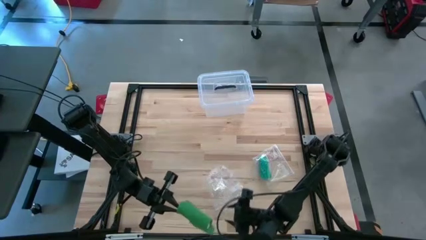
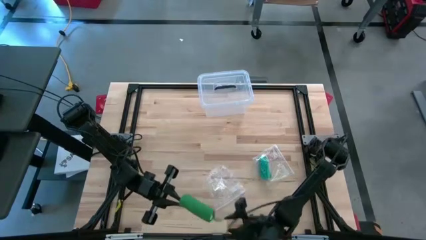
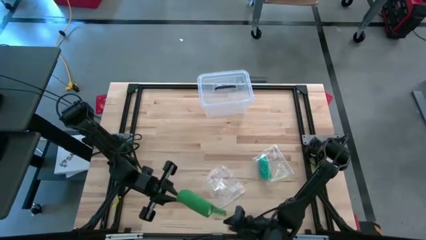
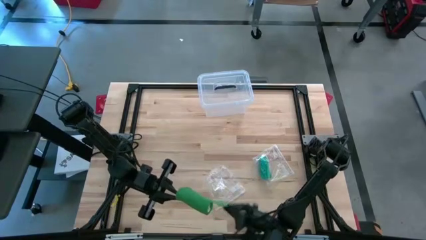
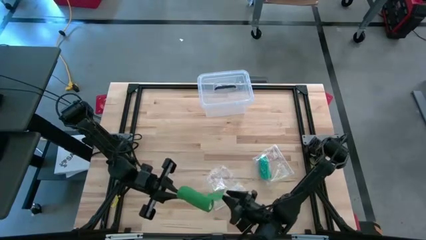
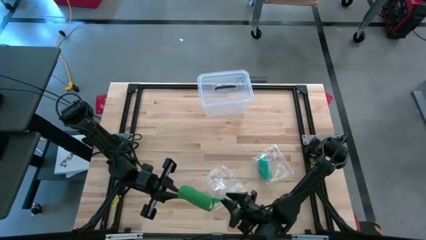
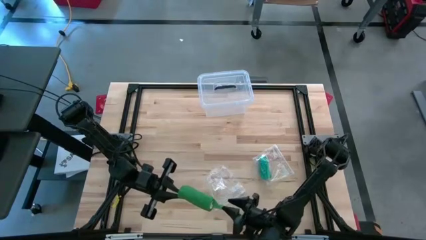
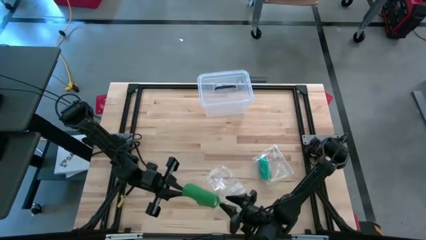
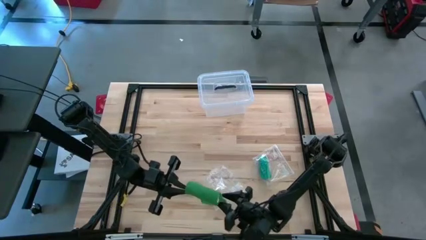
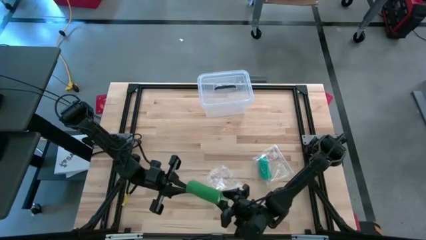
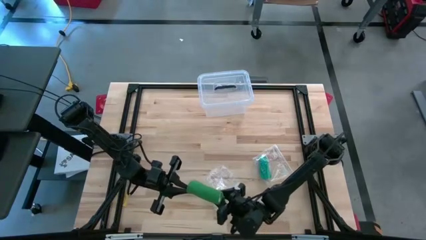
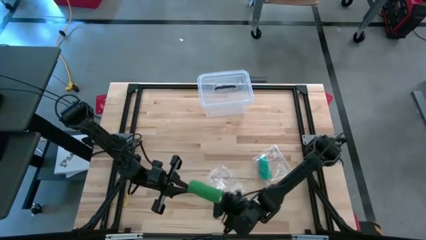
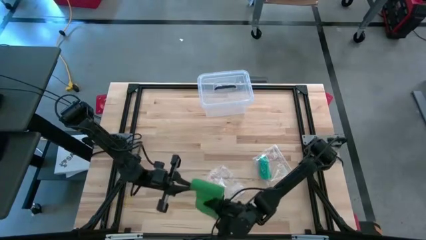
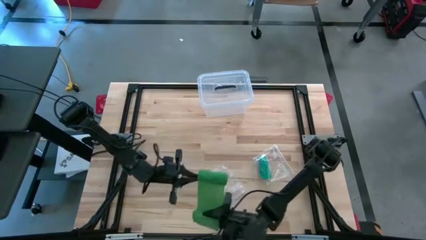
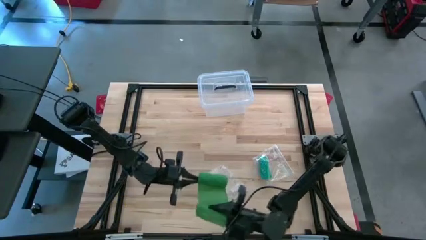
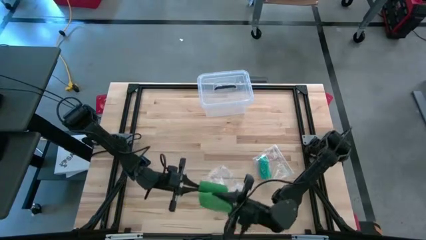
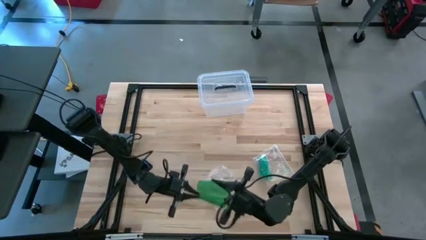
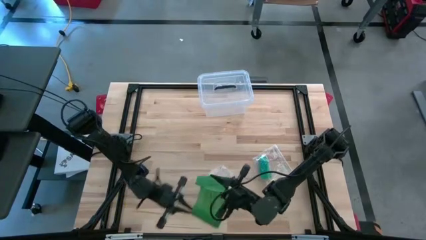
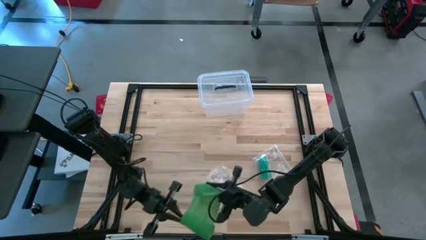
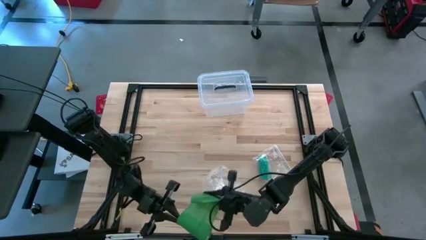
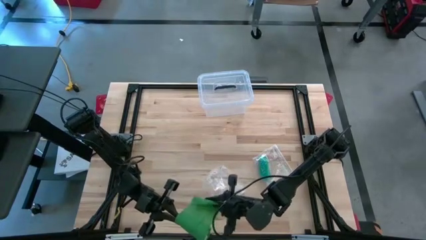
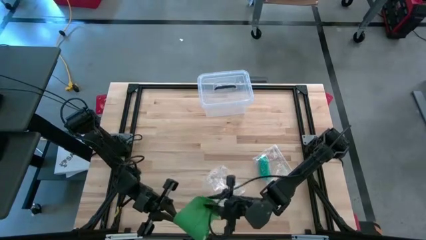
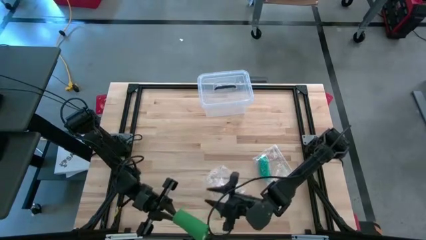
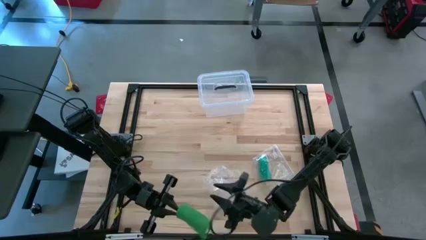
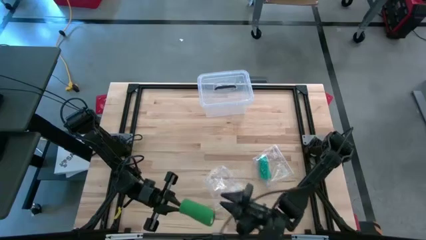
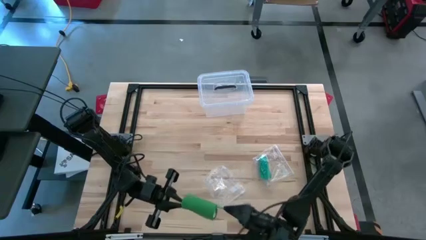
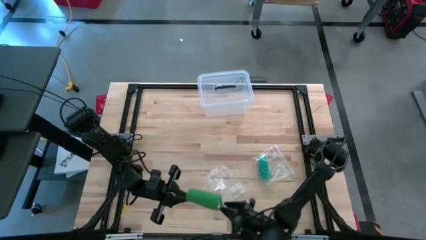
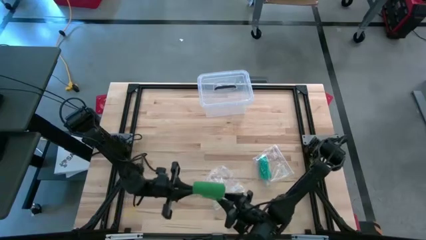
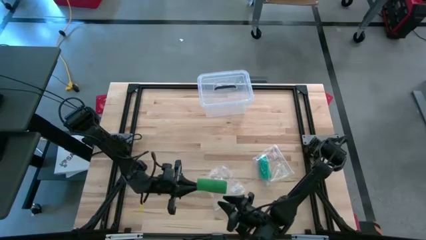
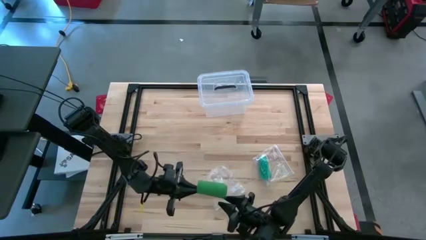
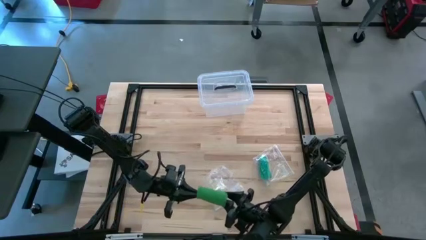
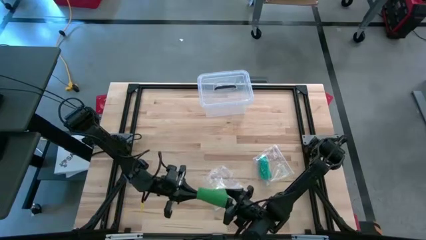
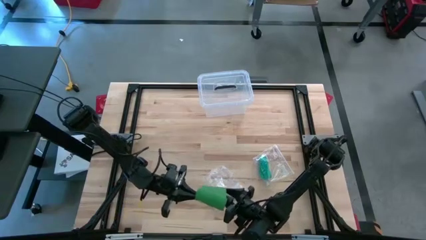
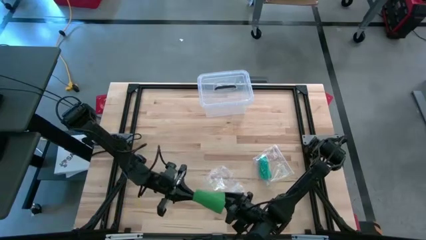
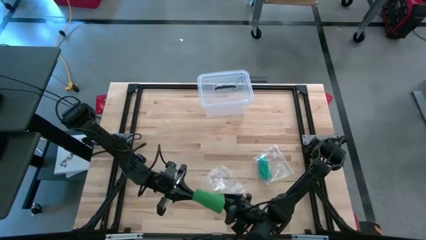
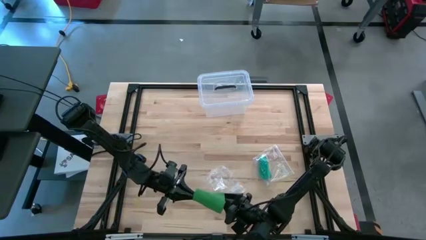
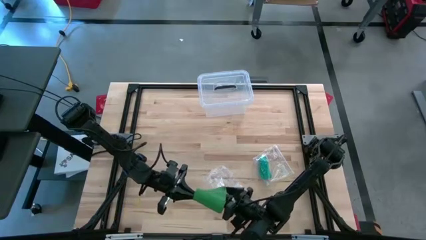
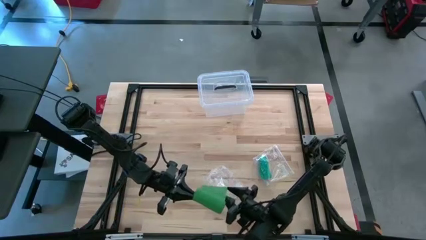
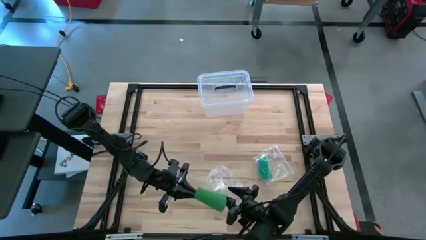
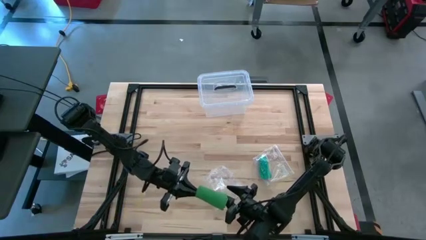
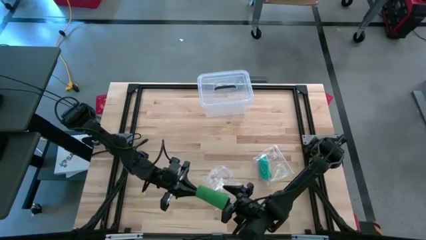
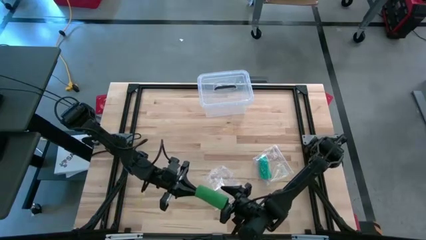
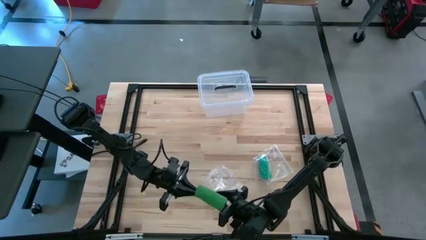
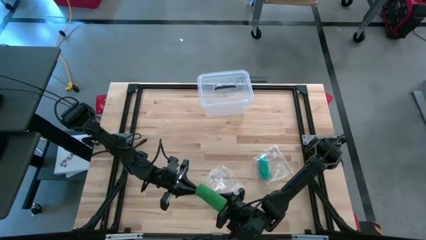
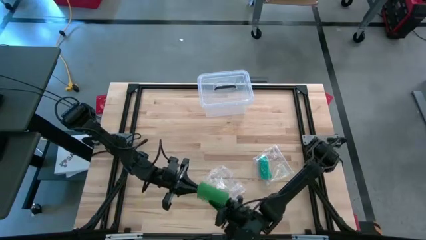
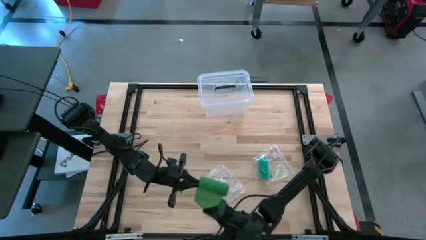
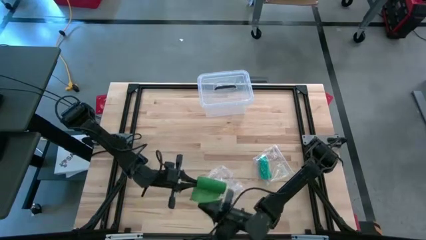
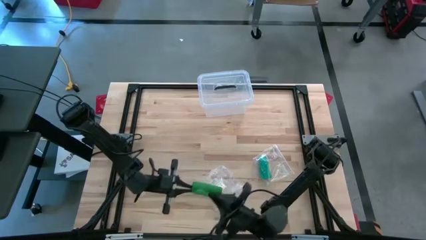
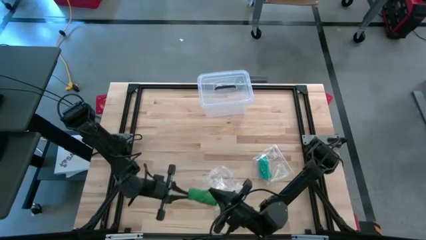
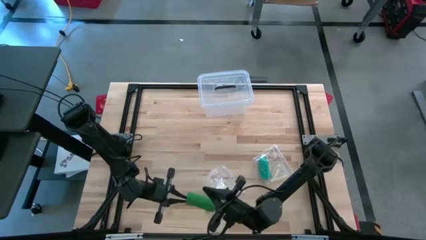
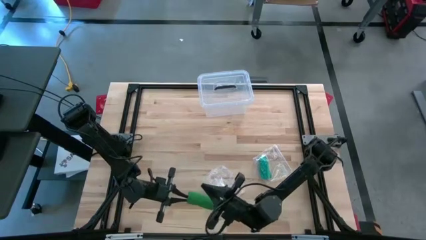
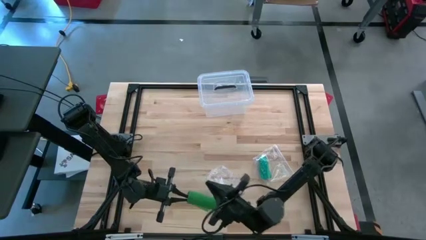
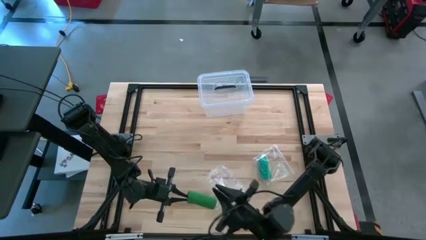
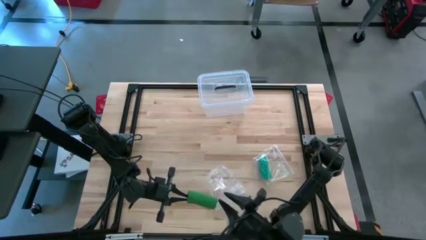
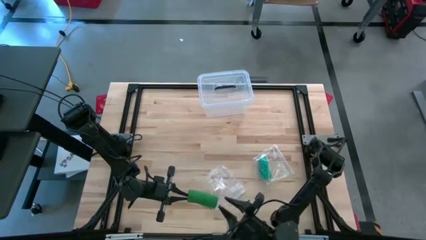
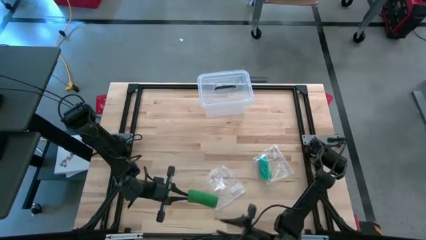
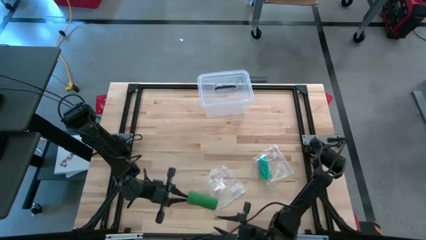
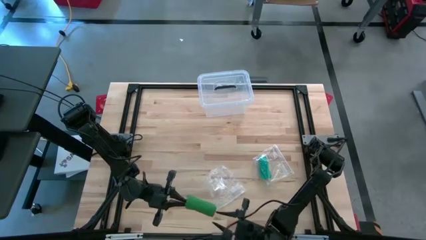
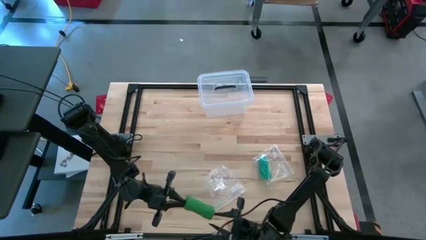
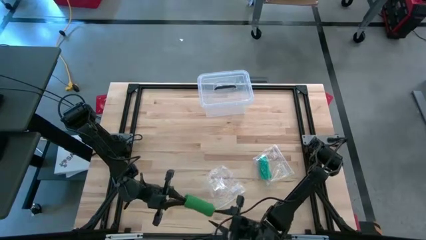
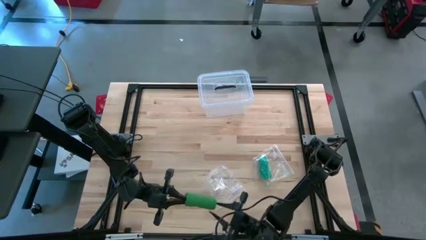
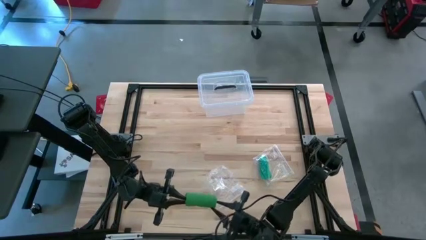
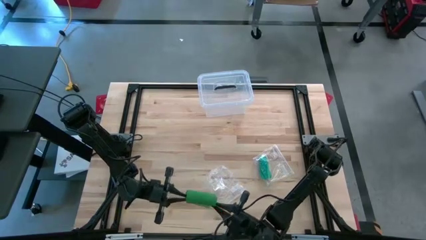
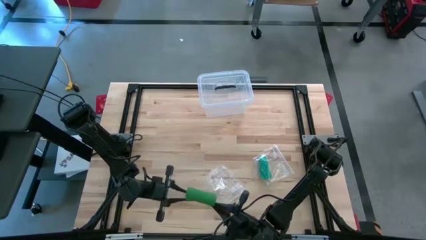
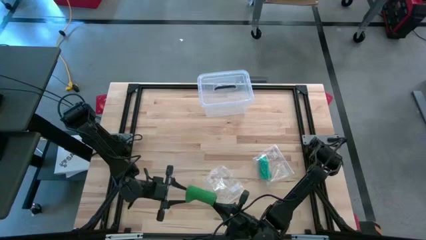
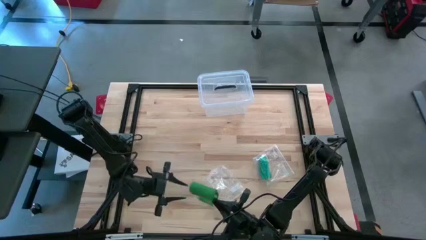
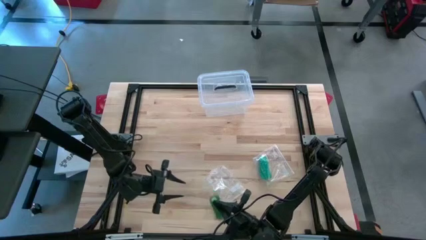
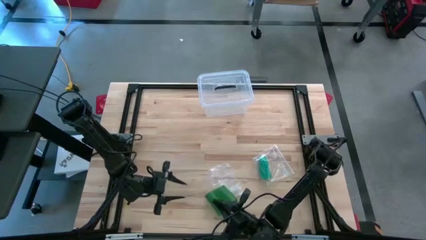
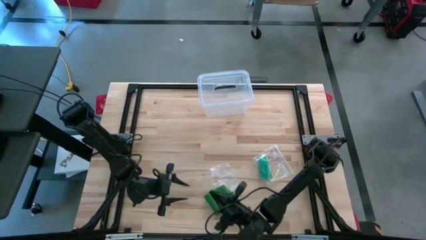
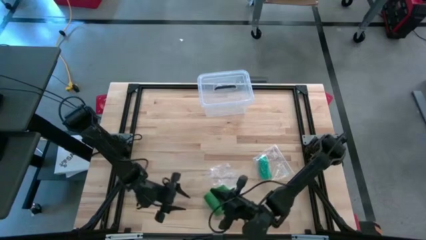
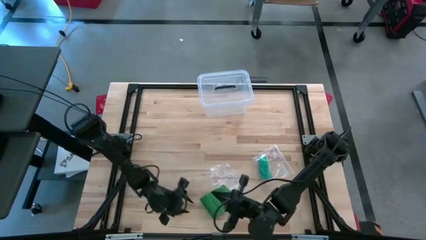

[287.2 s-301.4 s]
Task: Roll bandage
Roll the green bandage

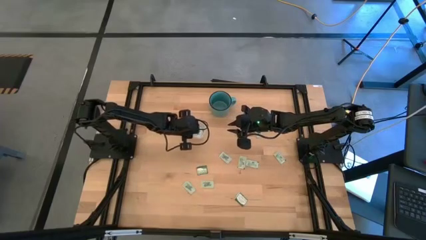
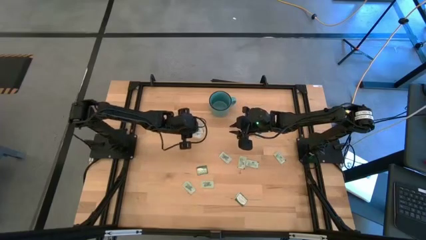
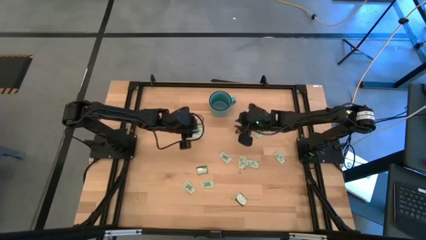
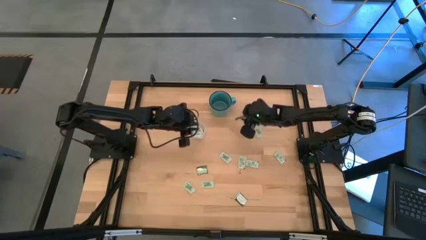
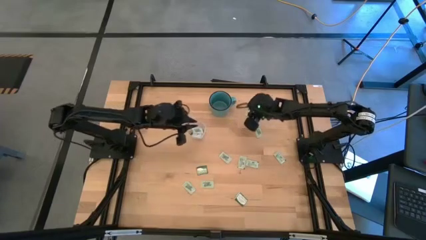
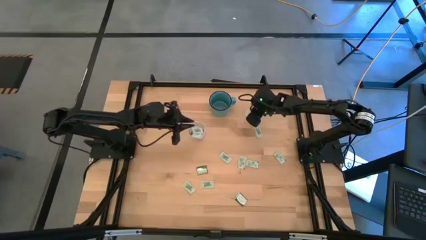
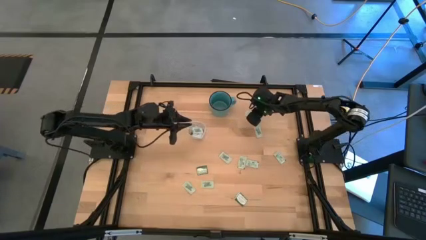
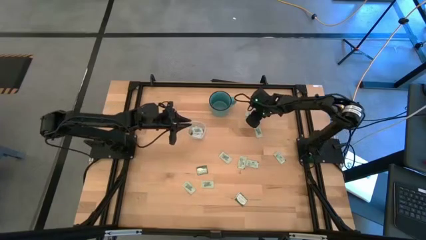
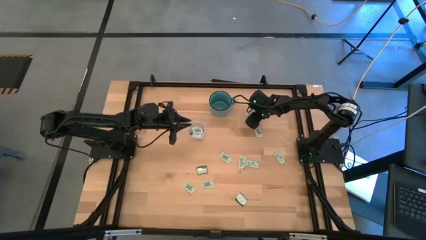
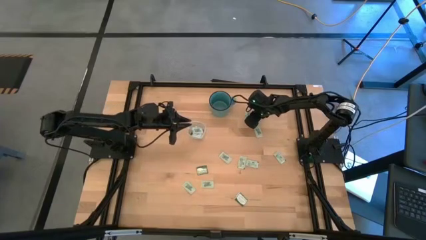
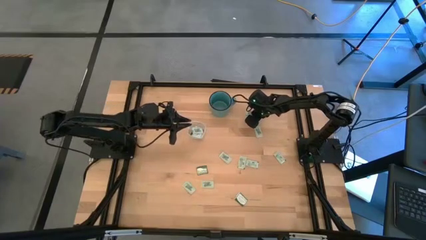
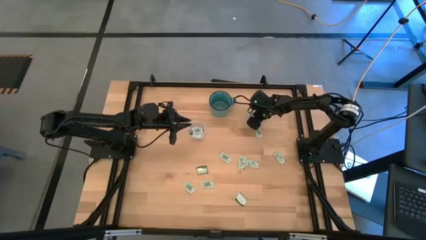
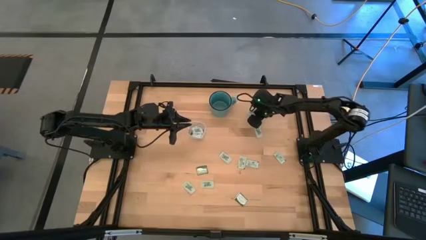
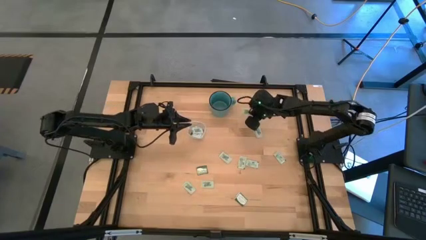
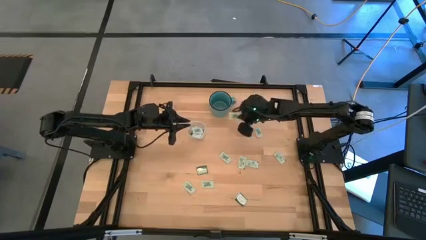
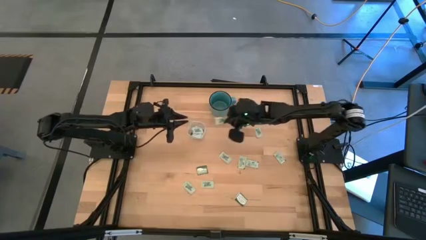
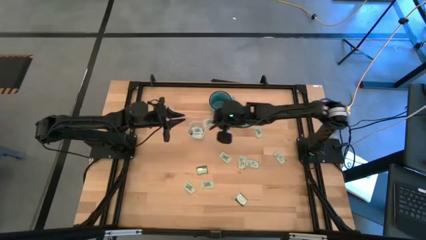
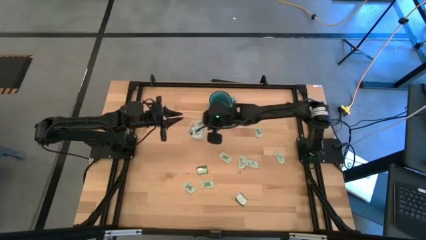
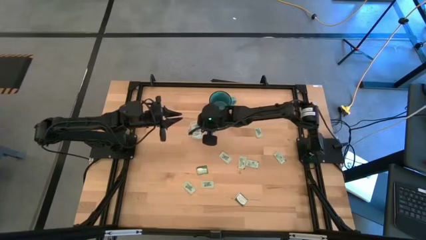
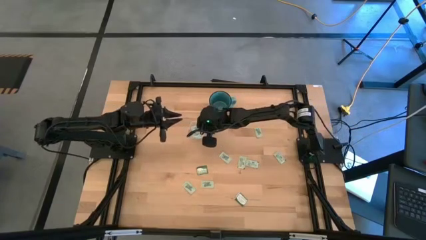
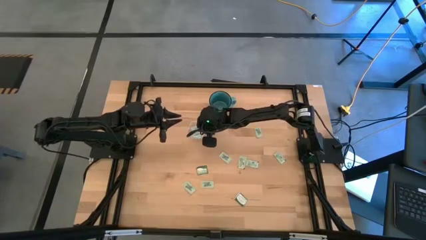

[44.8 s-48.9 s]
Task: Pick and place Stevia / Truvia into bins
Put the green stevia packet into the transparent container
